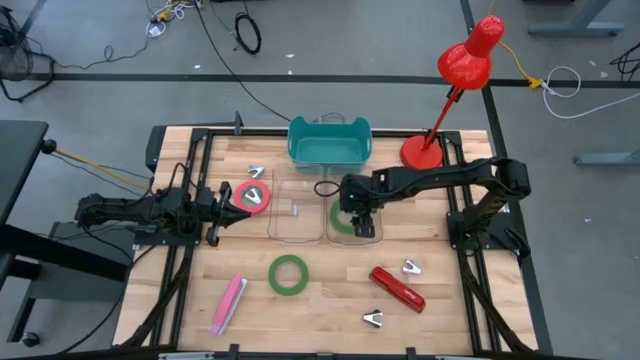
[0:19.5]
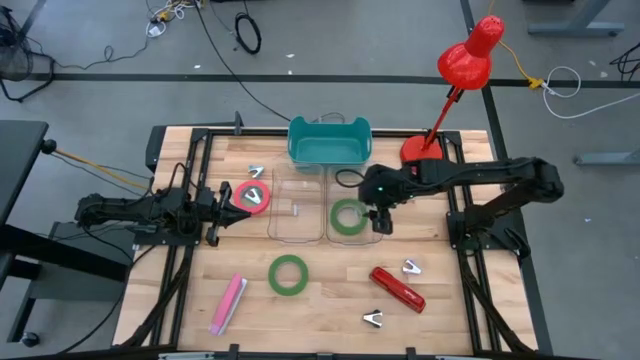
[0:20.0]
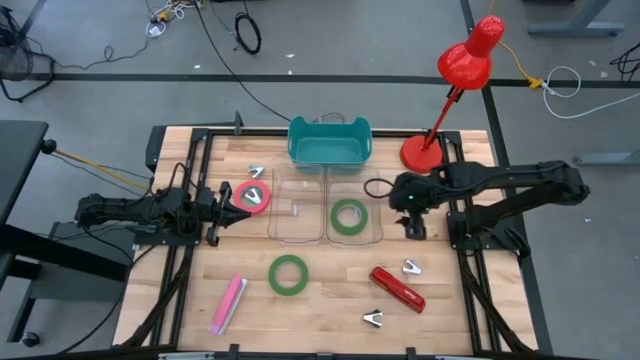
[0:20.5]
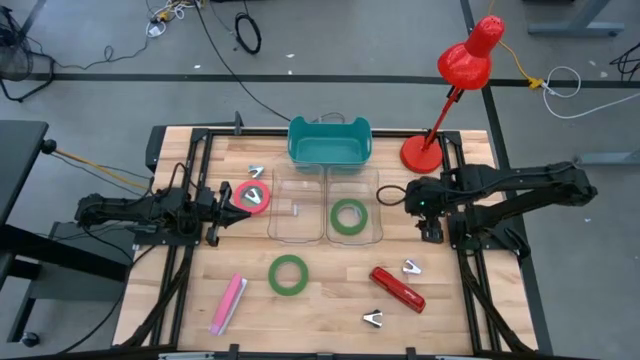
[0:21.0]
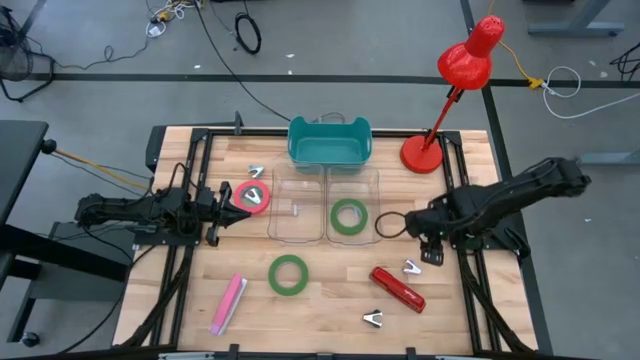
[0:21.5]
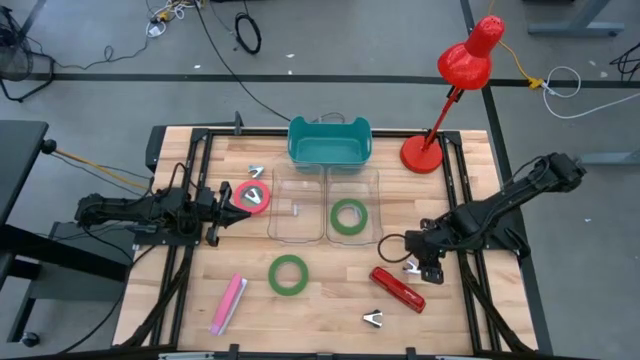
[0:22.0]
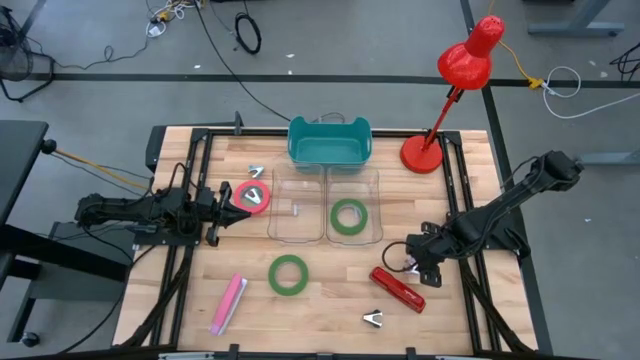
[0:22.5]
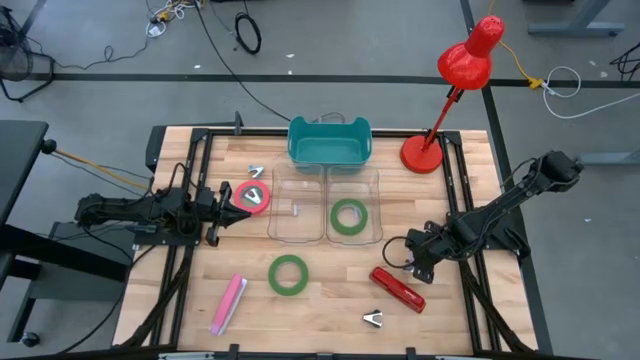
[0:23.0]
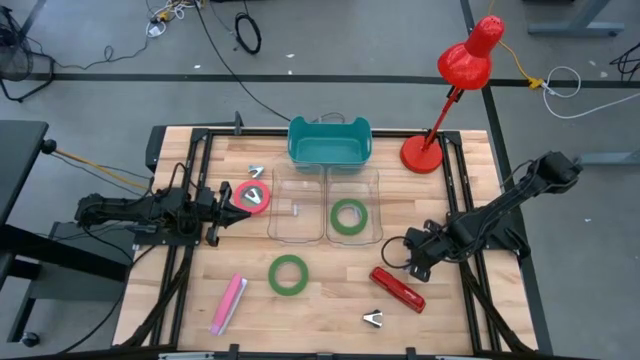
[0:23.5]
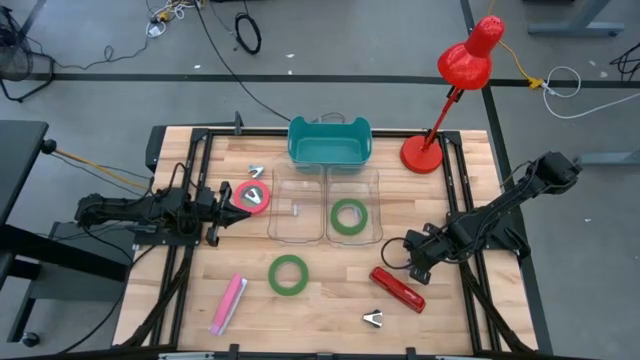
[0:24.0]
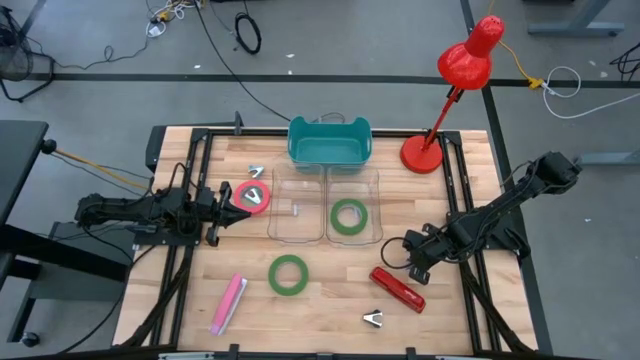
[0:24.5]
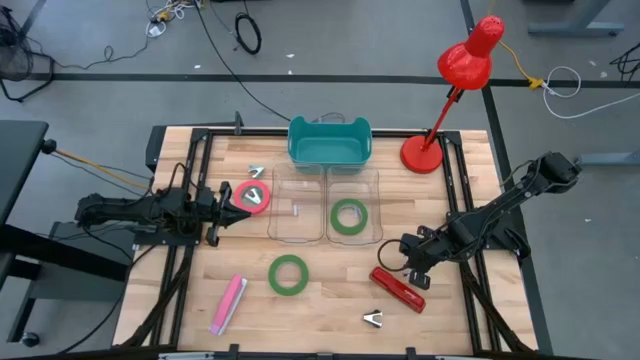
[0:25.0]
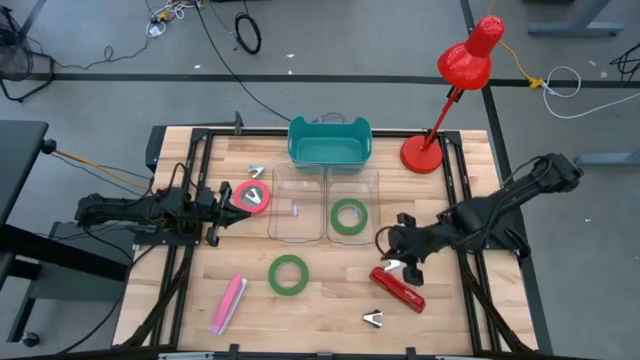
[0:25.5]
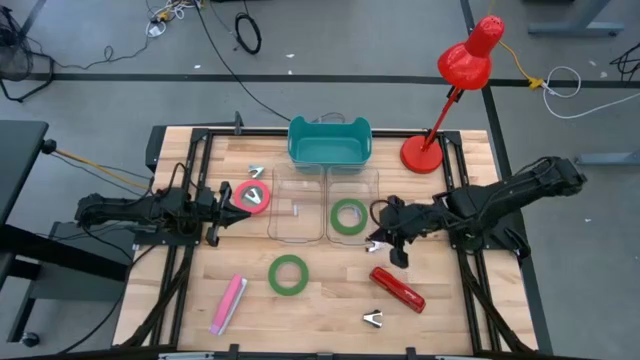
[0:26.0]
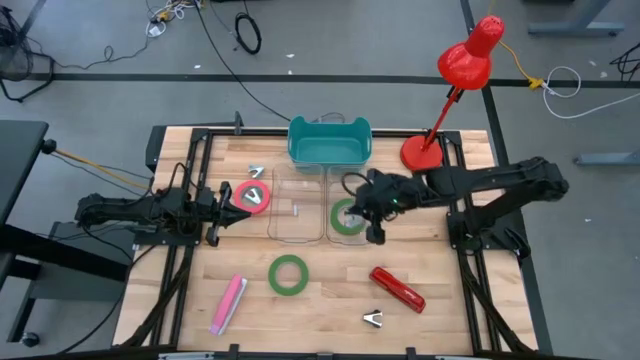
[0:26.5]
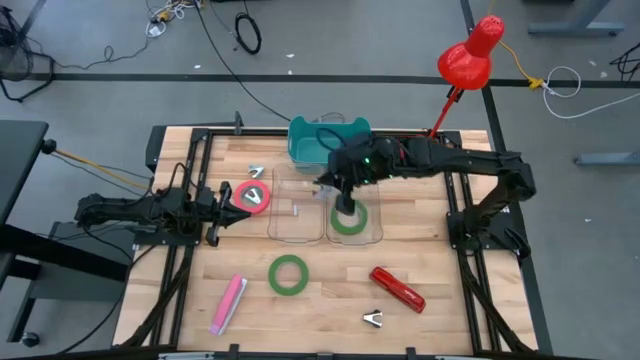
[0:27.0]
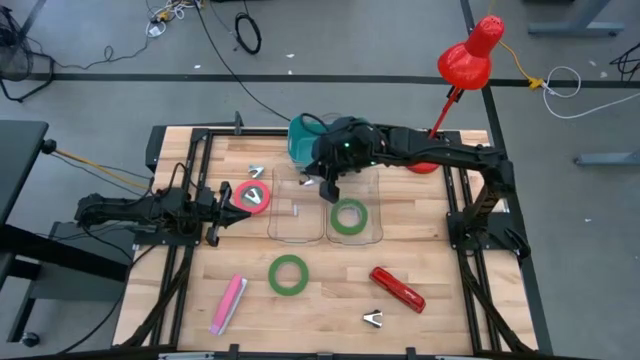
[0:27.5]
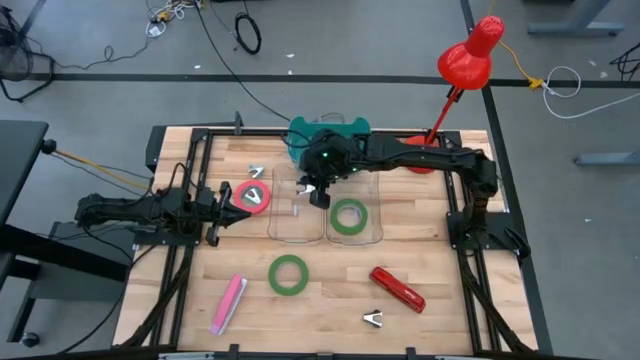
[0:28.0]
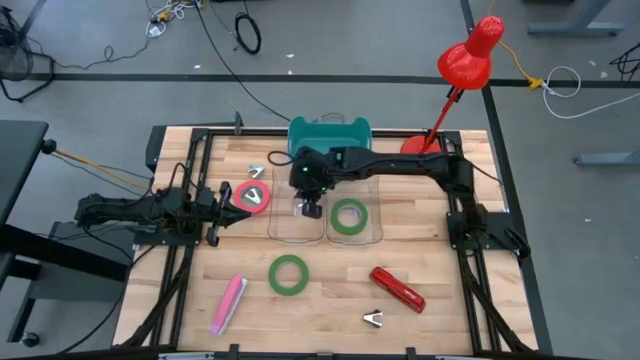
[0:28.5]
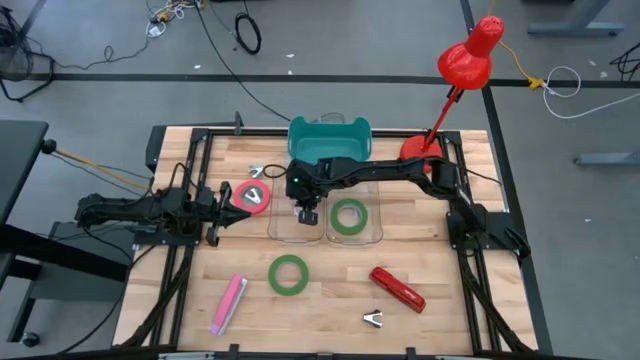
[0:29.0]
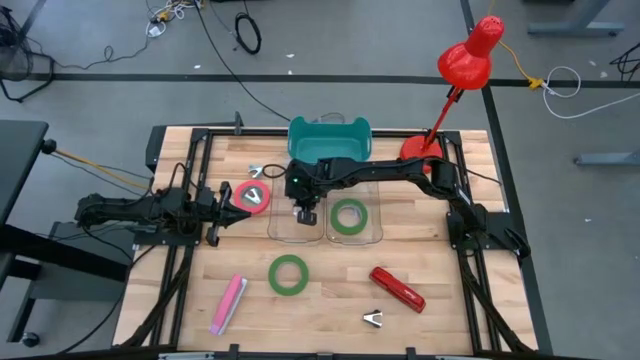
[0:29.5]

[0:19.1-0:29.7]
Task: Pick and place Stapler, Stapler remover, tape
Put the violet staple remover into the left transparent bin

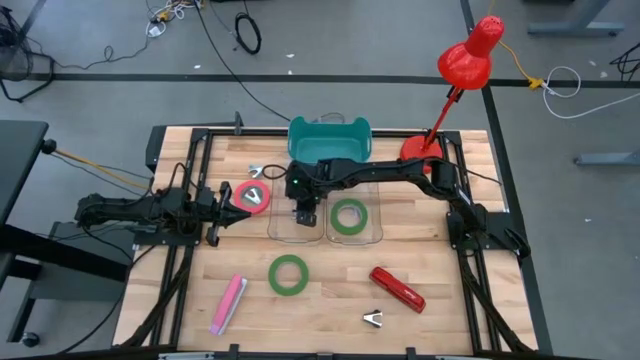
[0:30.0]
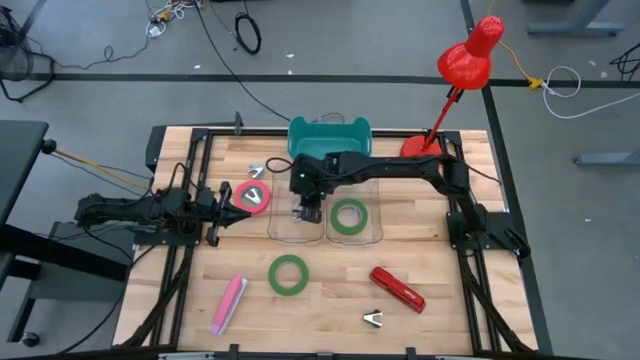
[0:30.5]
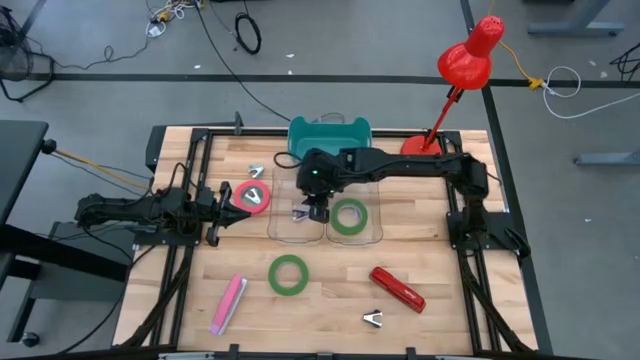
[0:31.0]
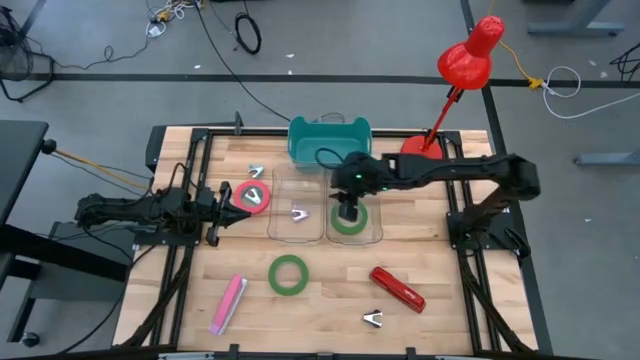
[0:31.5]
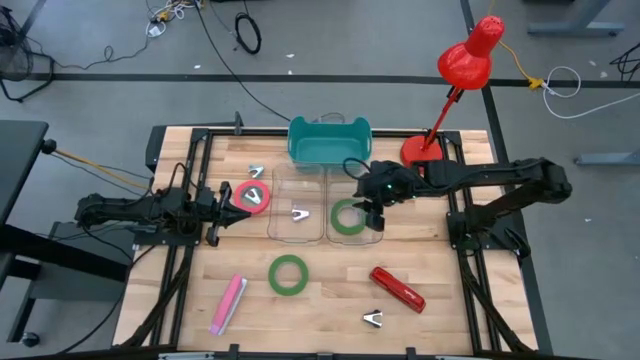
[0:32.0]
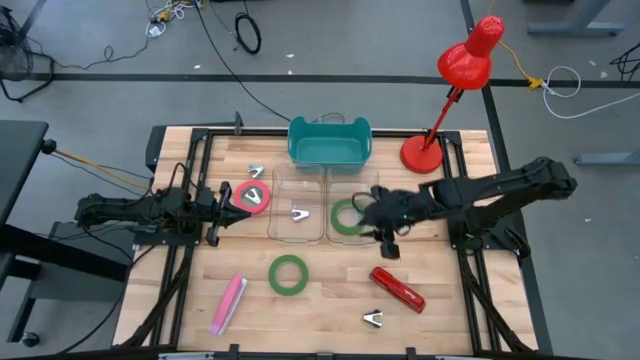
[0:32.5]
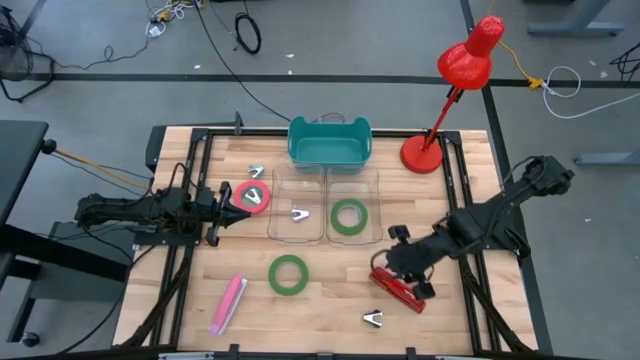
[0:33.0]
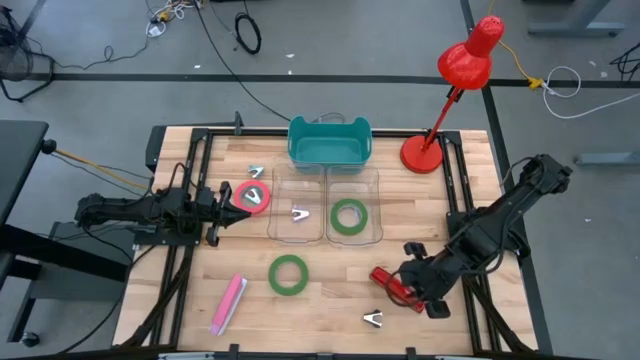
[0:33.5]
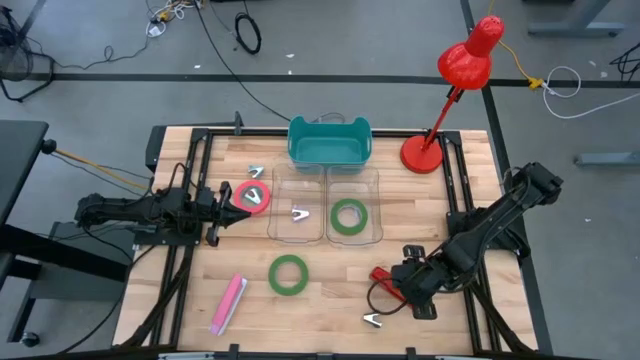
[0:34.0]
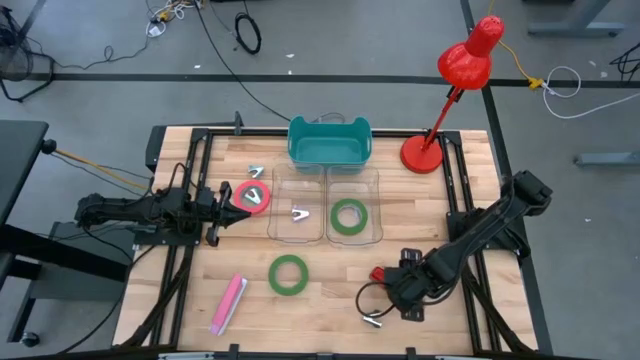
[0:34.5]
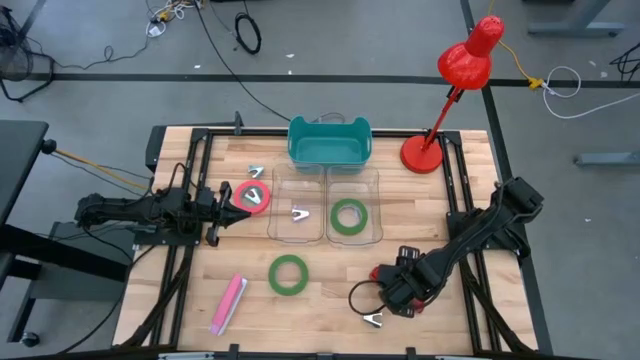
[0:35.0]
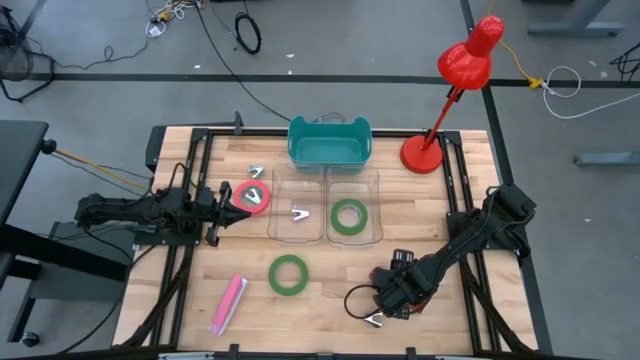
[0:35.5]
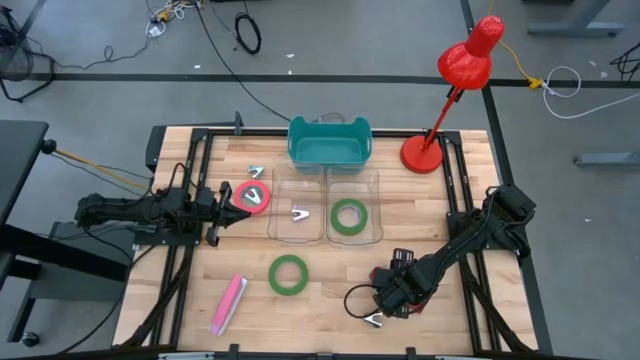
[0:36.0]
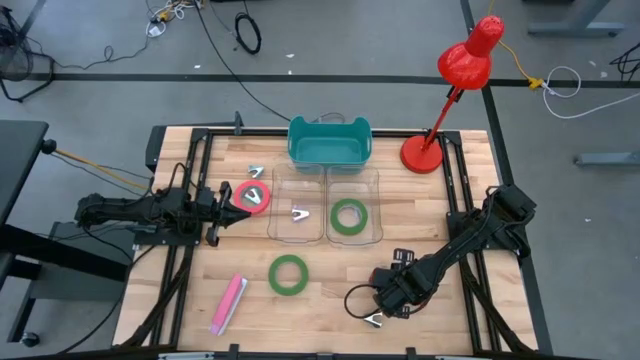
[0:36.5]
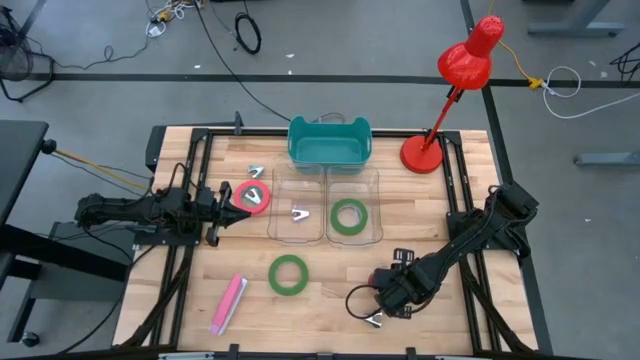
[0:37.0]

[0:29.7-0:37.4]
Put the red stapler into the blue bin

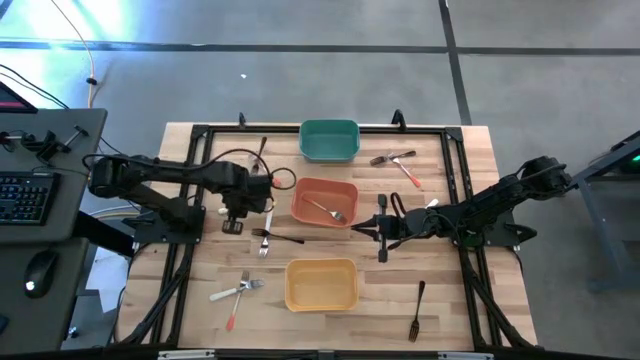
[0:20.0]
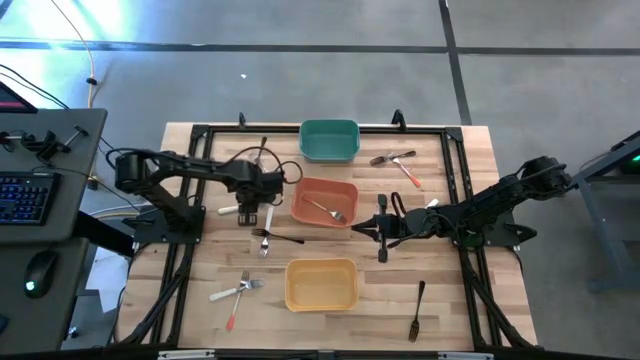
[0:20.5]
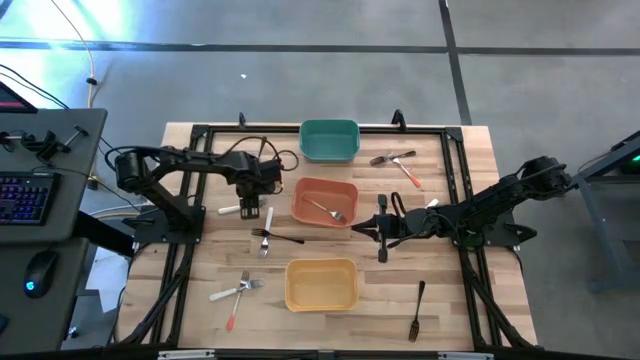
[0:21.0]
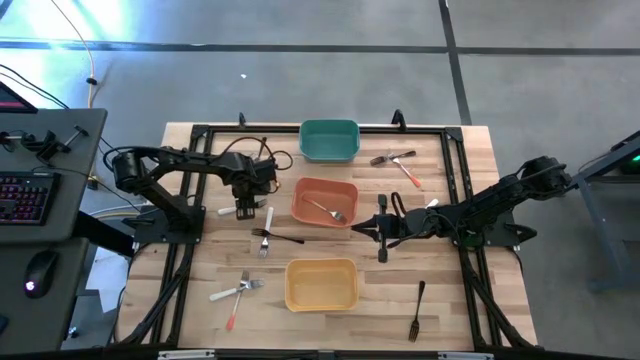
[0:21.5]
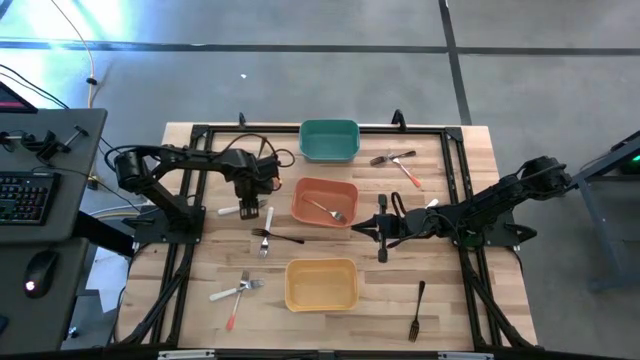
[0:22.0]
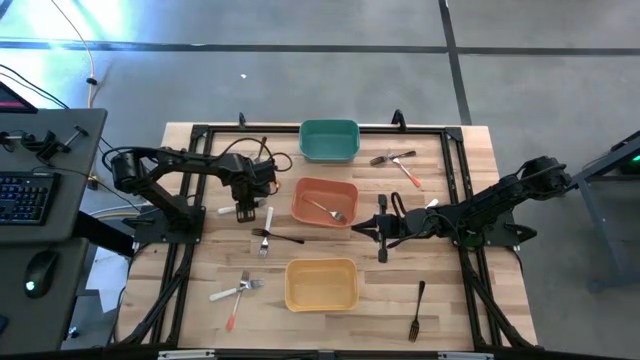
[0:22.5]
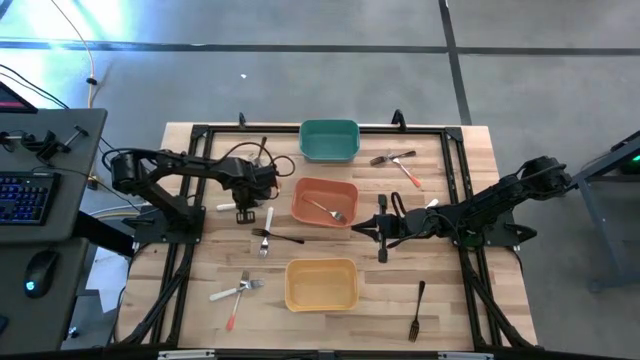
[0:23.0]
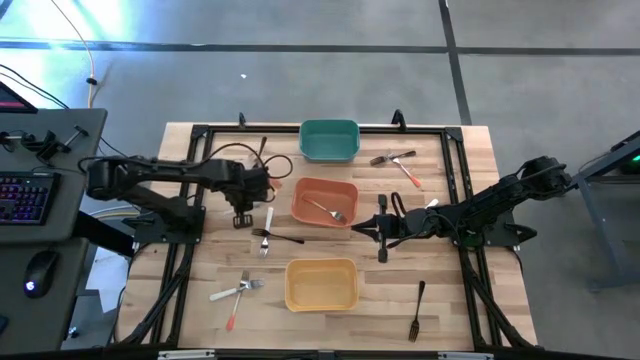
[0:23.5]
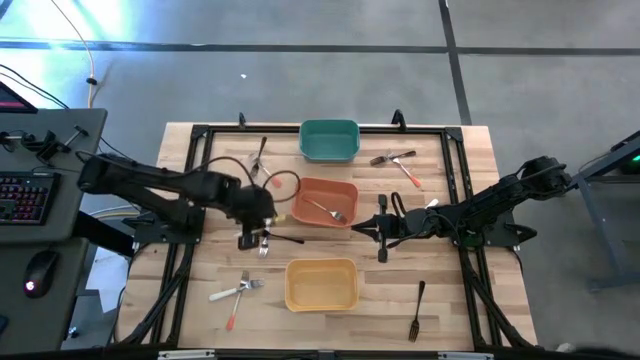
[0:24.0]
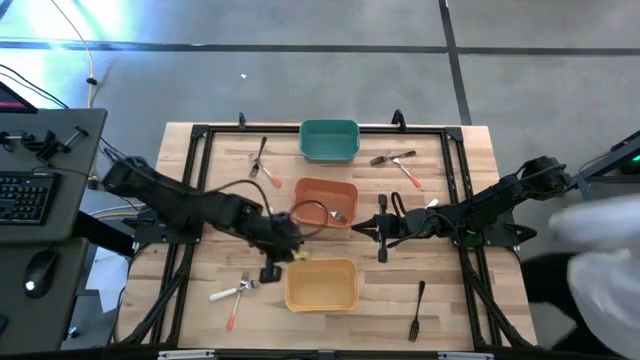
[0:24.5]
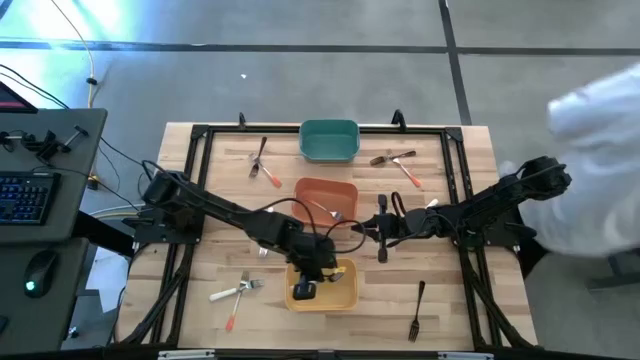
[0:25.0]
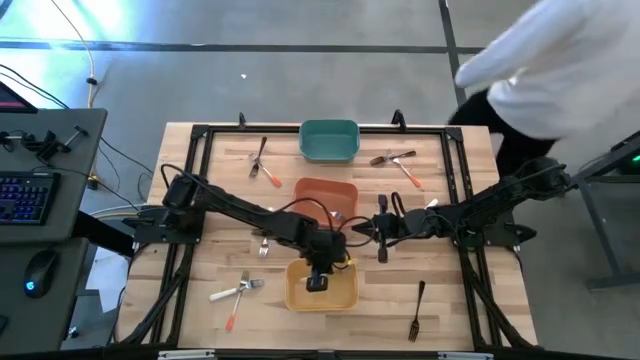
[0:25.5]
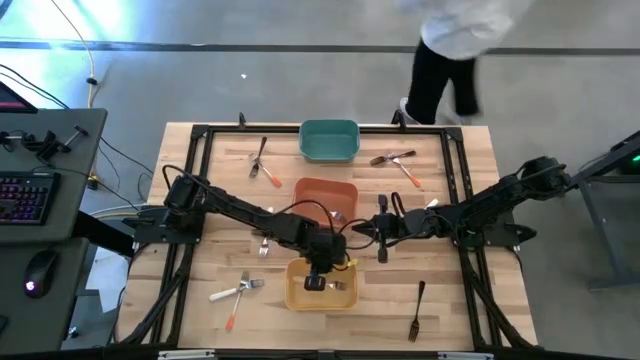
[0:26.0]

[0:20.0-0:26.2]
Task: Sort silverware by color (type)
Put the white fork into the yellow bin
